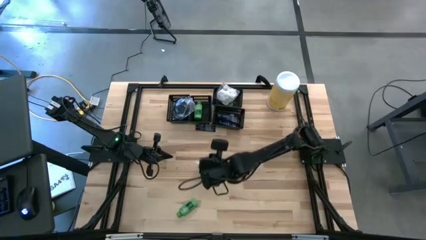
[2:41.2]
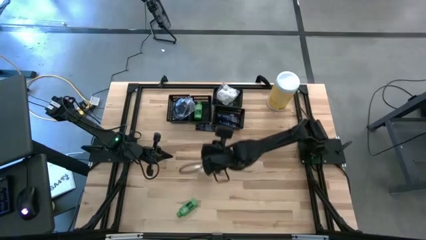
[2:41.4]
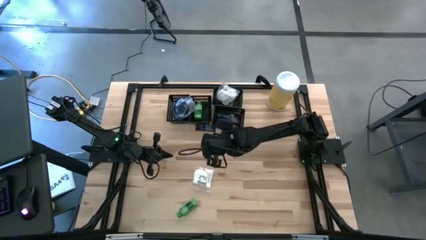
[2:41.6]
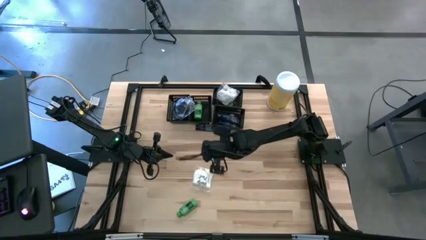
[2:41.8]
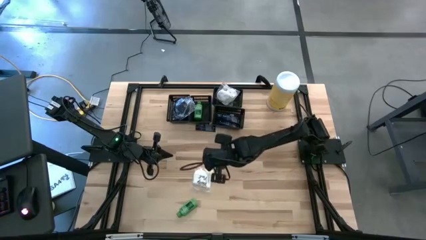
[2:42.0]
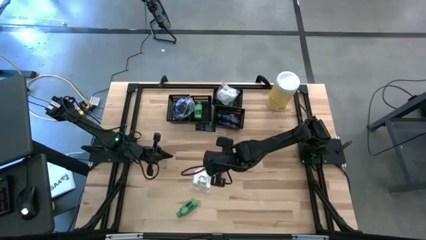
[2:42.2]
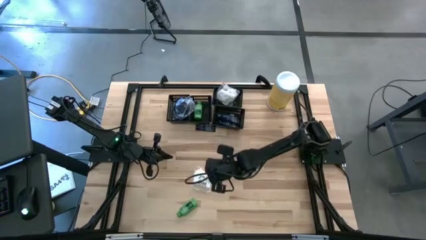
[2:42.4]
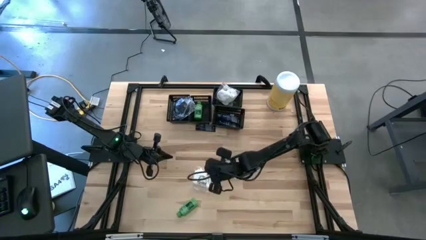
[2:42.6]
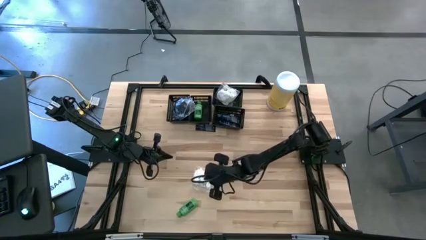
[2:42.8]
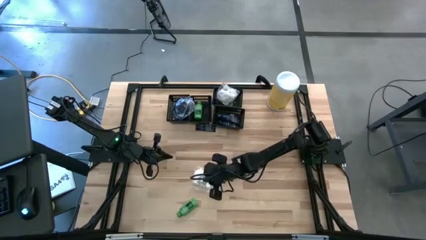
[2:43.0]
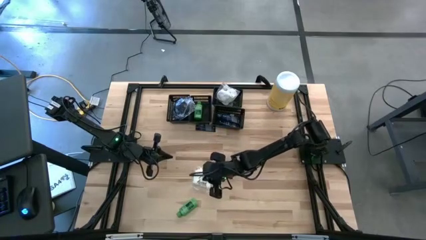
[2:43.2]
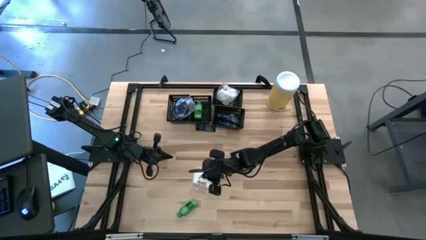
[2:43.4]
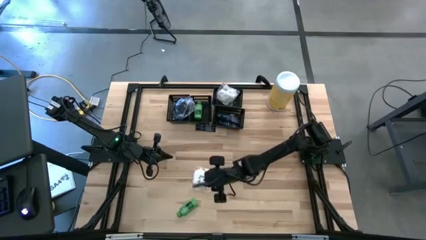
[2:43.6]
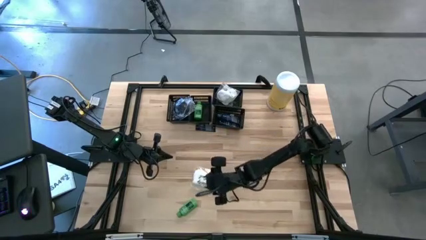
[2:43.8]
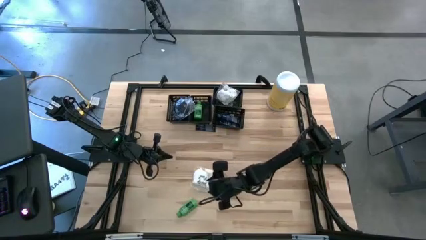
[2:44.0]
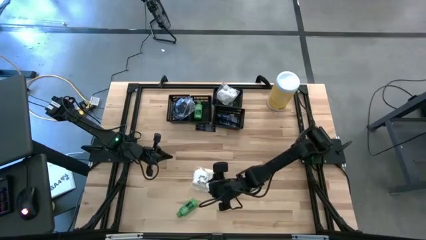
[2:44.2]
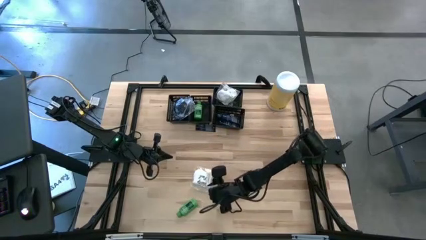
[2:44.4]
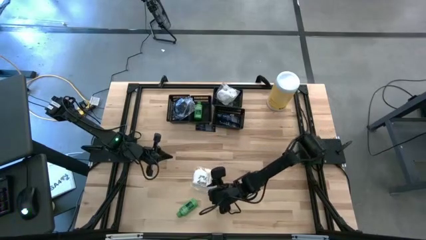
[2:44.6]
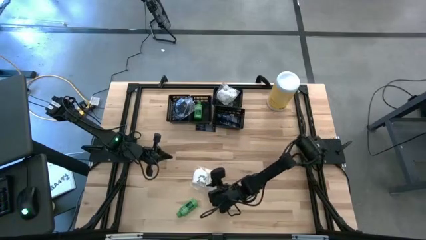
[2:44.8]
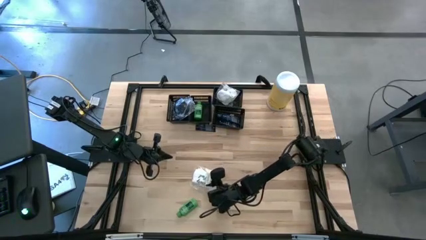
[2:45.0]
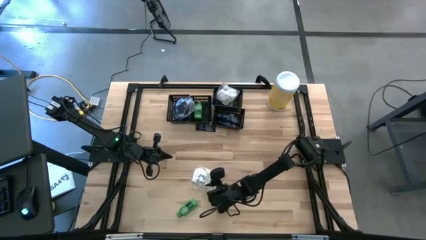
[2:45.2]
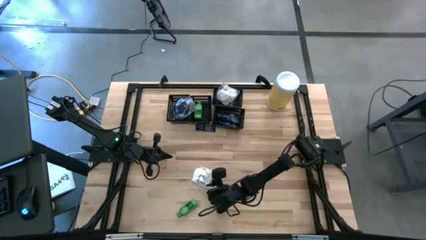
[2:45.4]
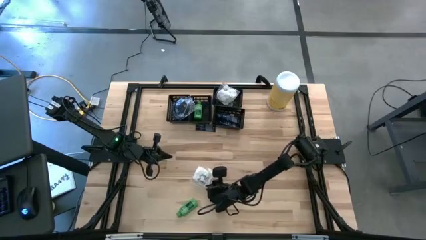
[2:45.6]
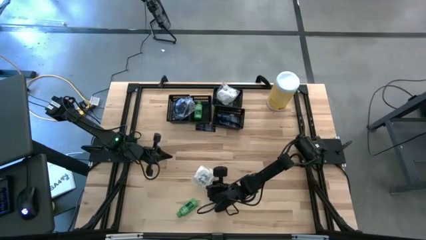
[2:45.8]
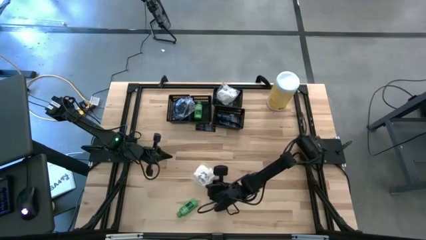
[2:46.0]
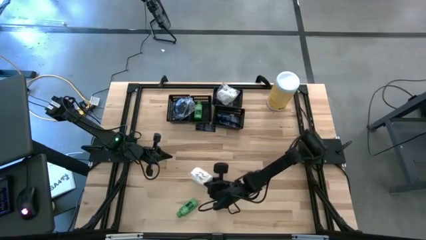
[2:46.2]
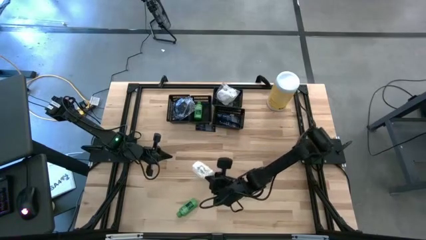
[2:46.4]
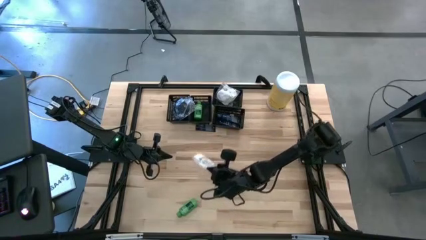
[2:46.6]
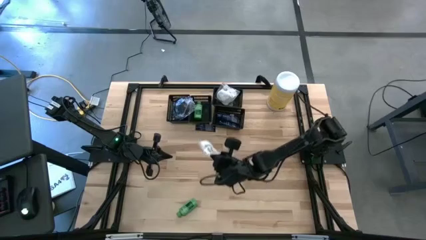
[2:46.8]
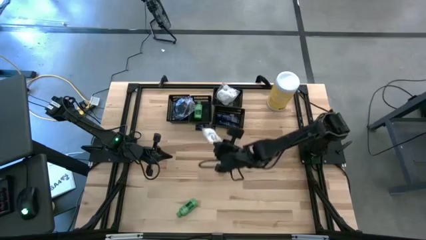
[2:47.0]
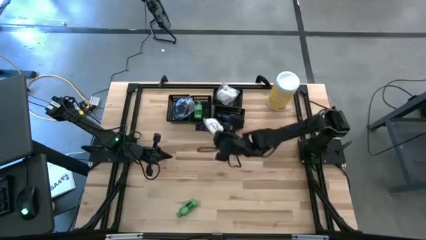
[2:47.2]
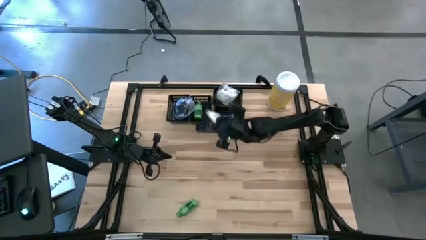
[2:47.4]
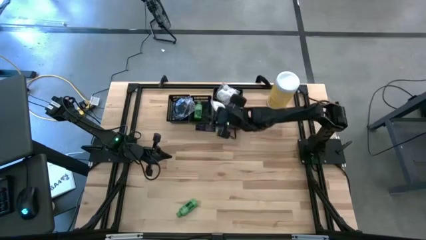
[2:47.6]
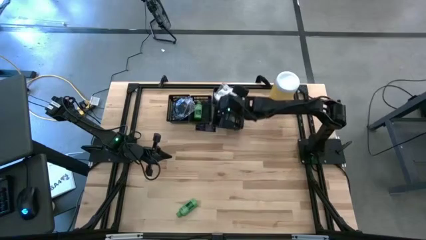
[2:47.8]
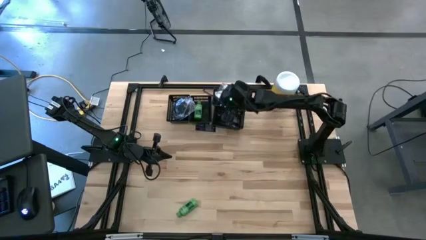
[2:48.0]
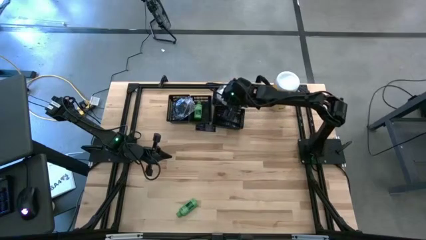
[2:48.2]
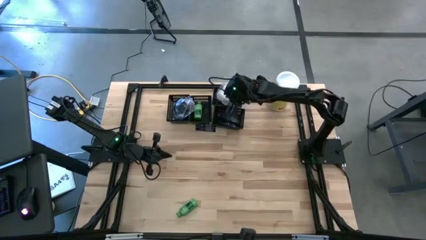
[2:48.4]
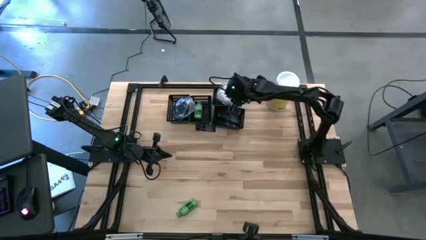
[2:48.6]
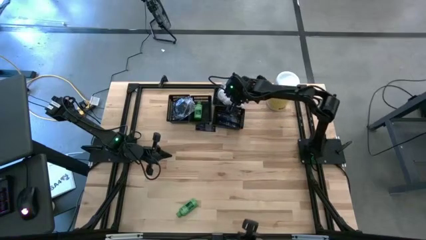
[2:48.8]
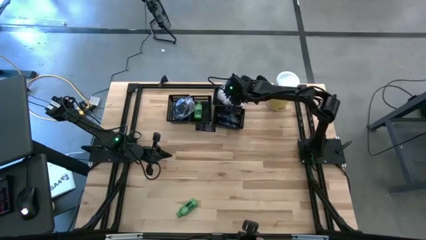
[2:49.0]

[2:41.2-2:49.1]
Task: Pick & Place Travel size toiletries
Put the white cotton buds into the top black bin

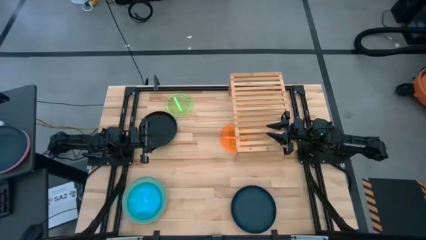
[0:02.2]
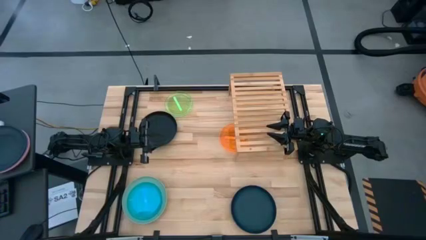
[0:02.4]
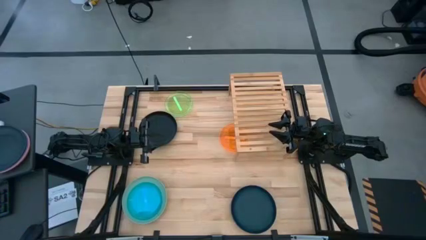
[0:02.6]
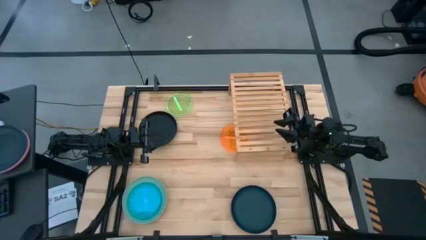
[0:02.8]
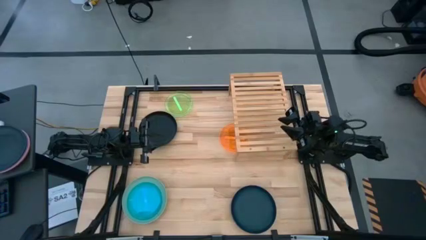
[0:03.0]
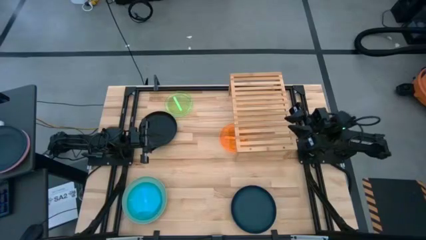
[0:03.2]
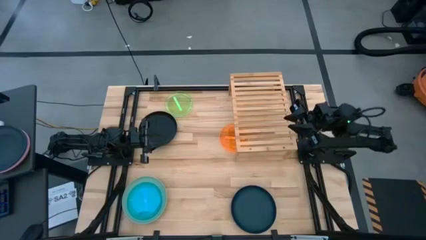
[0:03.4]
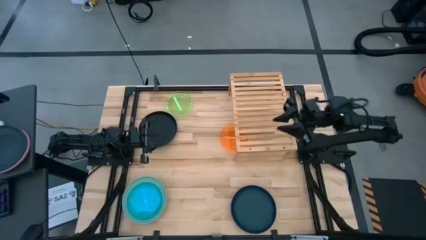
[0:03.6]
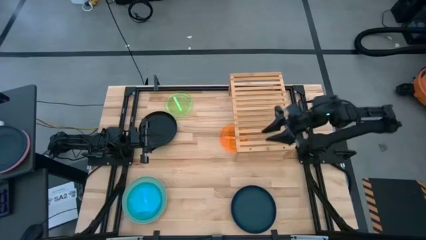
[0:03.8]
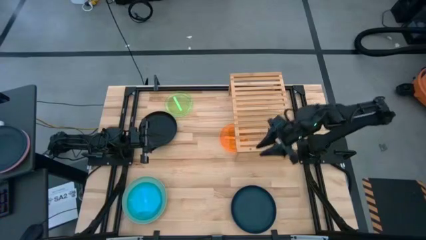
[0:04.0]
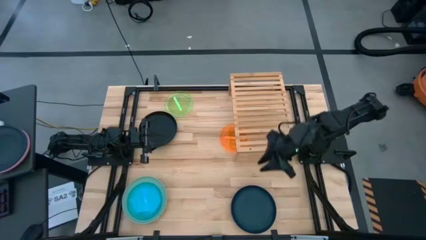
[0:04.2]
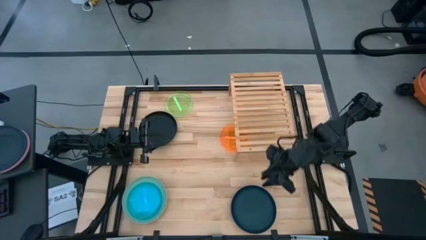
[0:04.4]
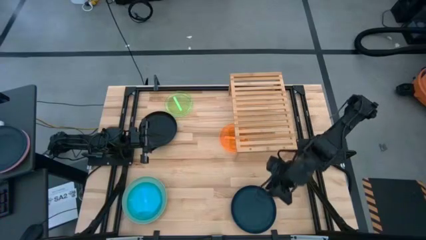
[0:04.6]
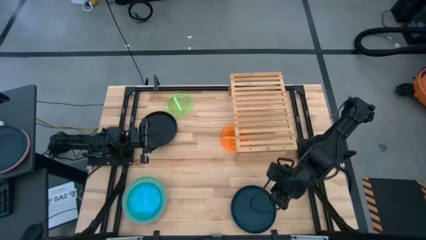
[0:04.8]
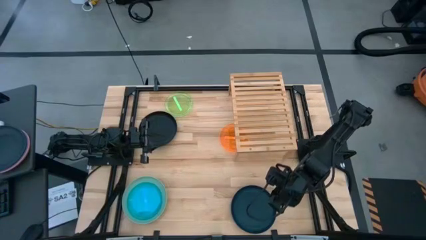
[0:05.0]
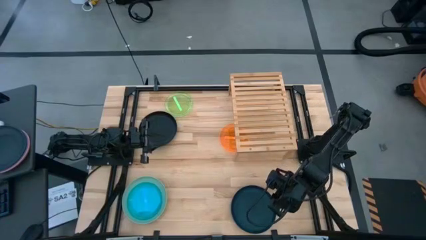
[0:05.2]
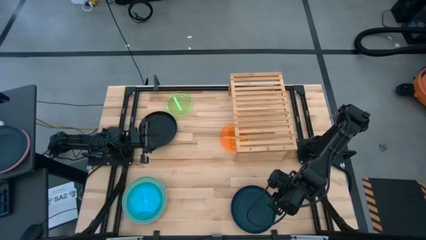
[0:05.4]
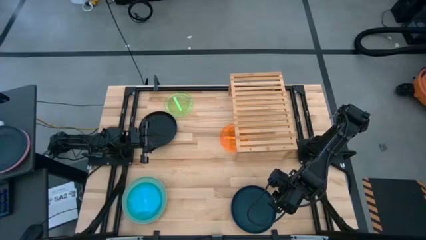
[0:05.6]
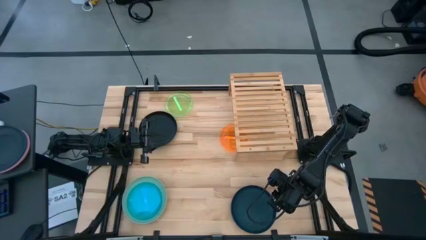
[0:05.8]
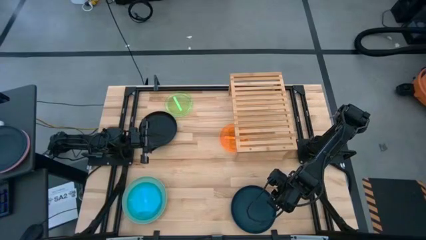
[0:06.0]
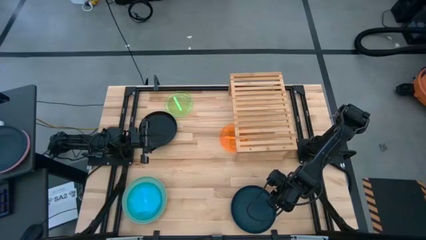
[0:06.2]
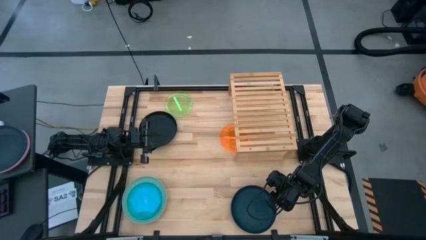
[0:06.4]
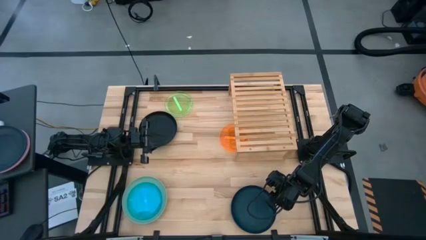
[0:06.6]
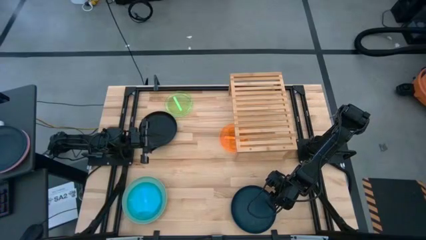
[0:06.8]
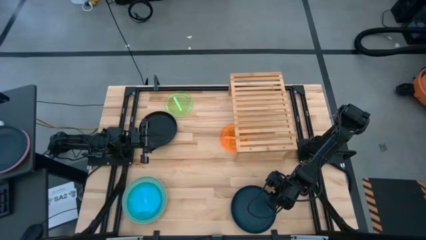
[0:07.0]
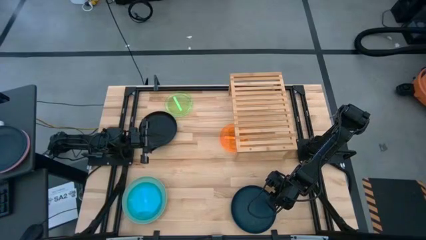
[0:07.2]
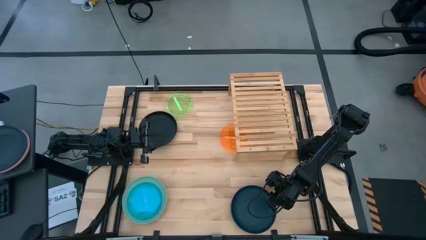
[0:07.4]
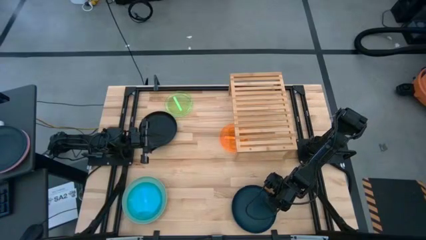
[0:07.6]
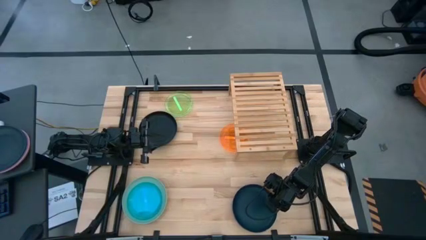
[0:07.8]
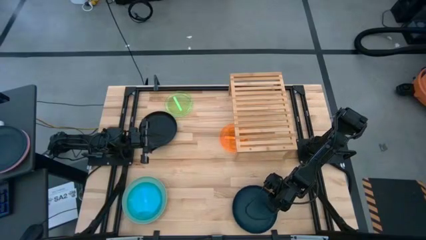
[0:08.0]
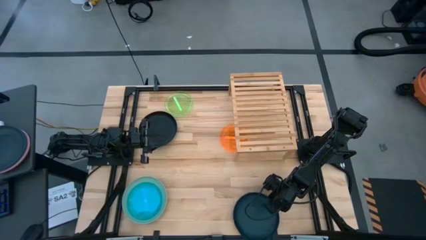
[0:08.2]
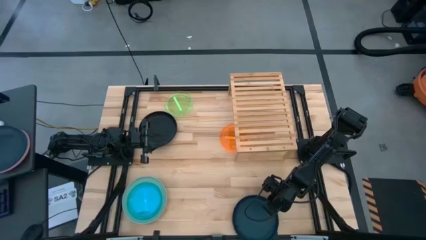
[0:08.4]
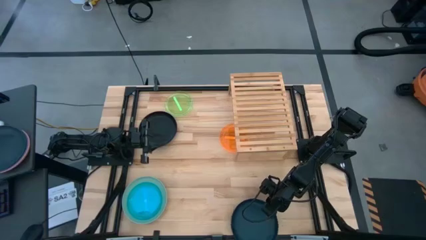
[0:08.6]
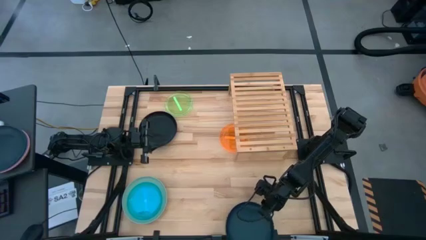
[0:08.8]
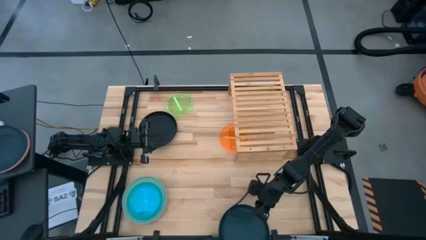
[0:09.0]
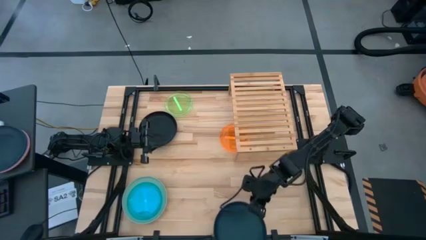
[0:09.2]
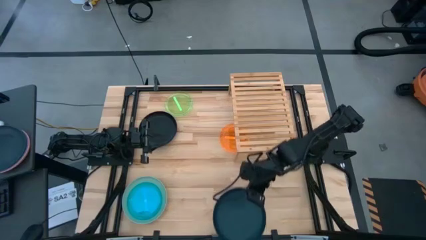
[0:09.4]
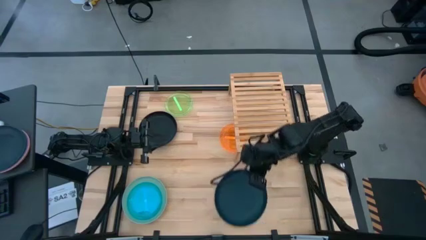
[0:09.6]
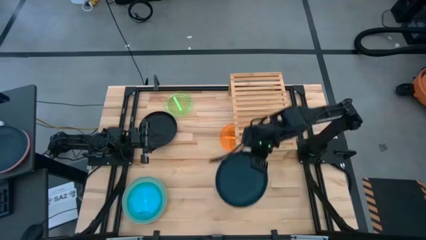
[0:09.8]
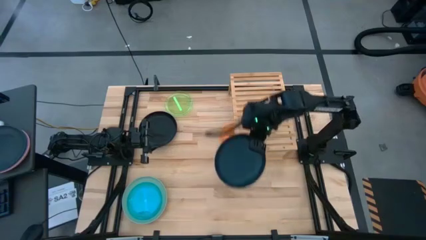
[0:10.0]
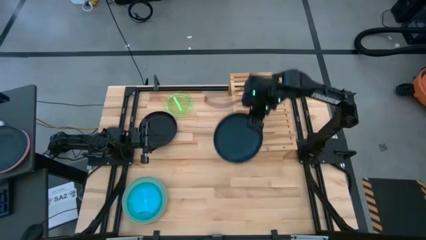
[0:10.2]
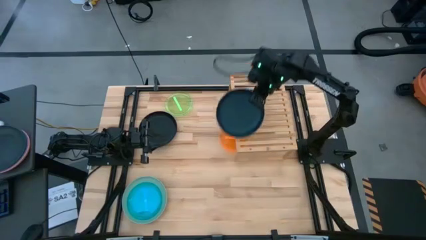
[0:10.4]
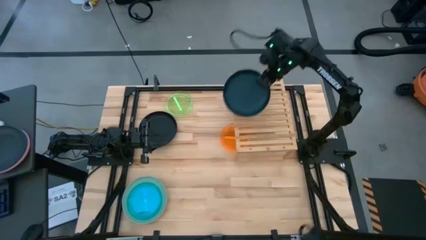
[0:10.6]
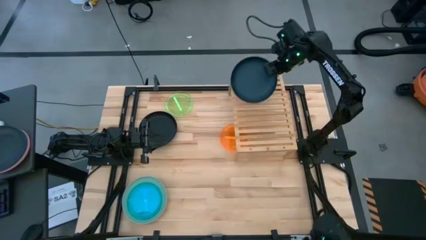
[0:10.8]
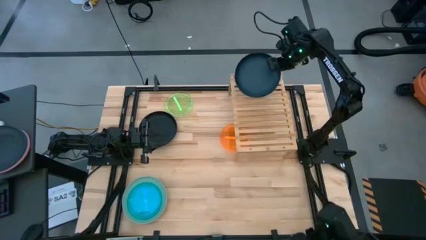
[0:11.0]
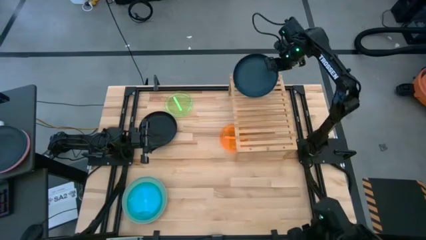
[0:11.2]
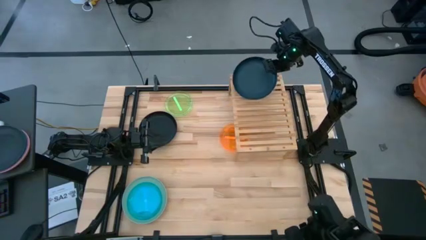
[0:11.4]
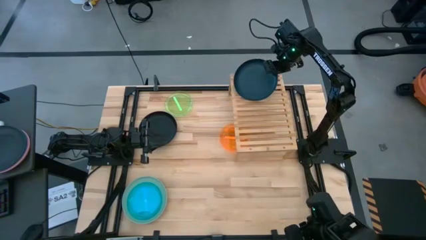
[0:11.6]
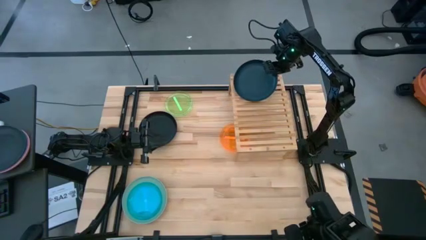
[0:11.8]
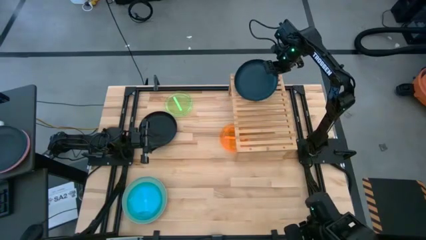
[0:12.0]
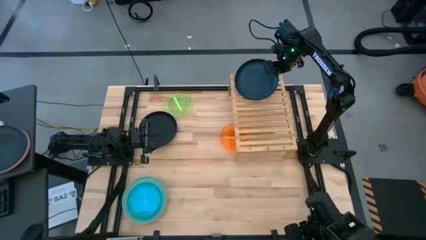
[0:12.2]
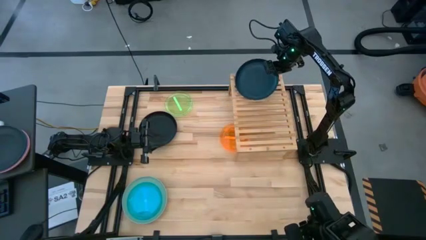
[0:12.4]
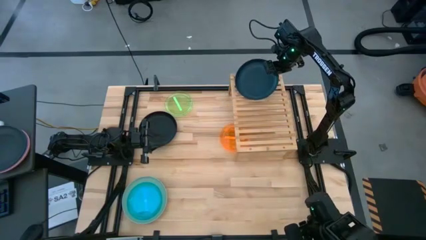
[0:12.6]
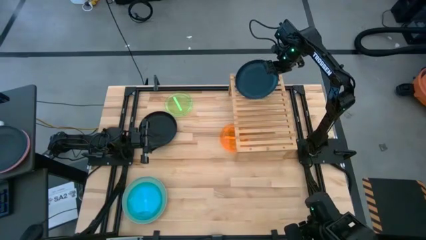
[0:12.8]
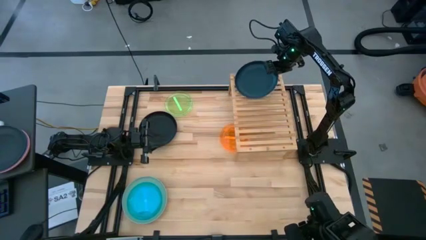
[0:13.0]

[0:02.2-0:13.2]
Task: Place and stack plates onto a shelf
Put the dark blue plate on the shelf
